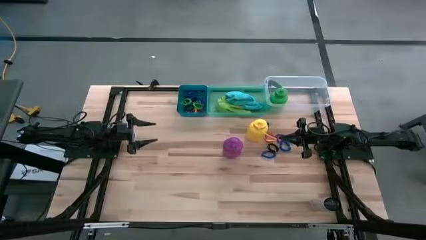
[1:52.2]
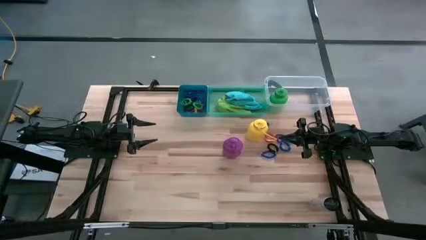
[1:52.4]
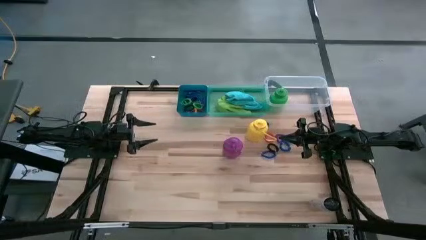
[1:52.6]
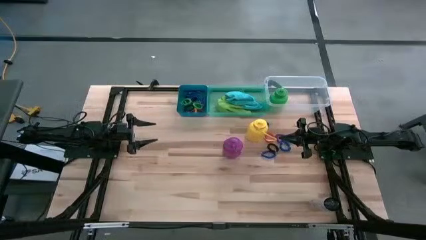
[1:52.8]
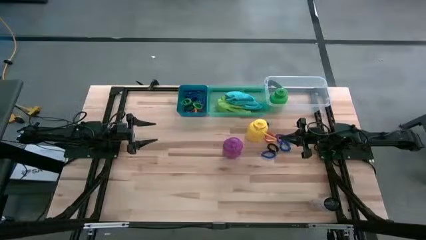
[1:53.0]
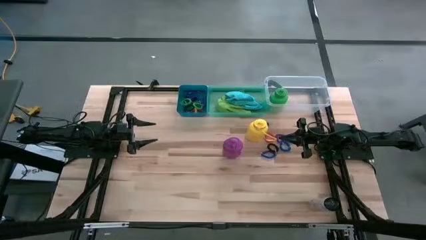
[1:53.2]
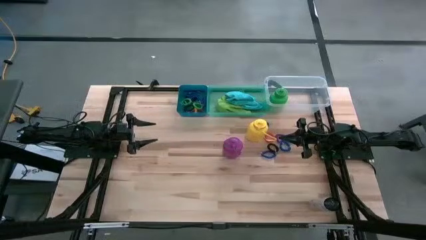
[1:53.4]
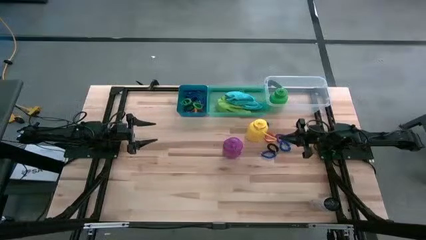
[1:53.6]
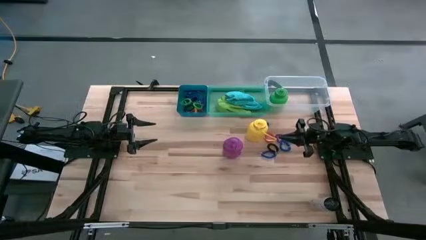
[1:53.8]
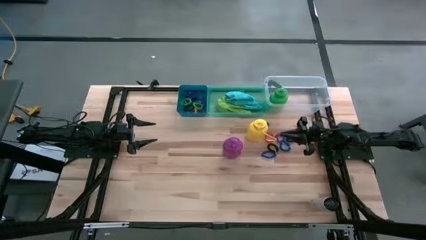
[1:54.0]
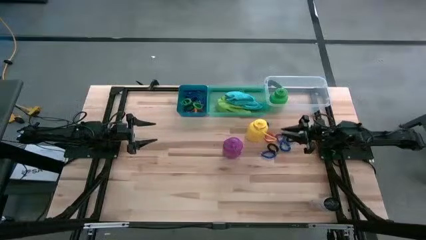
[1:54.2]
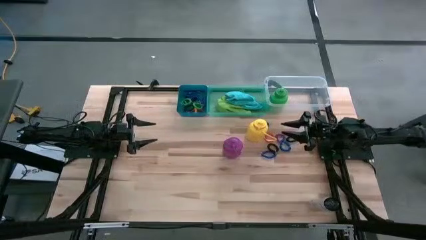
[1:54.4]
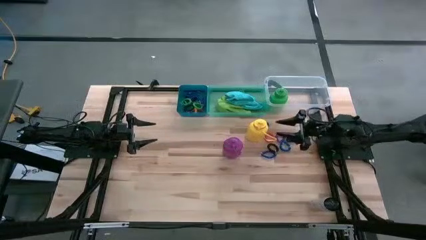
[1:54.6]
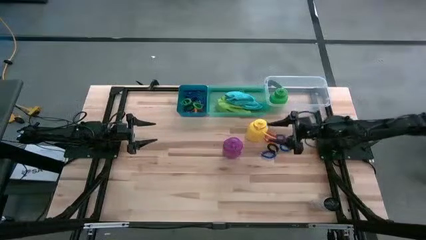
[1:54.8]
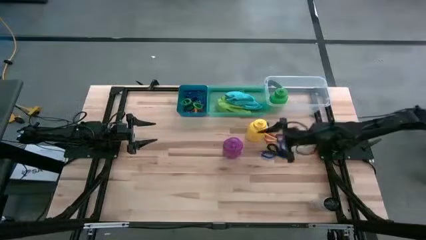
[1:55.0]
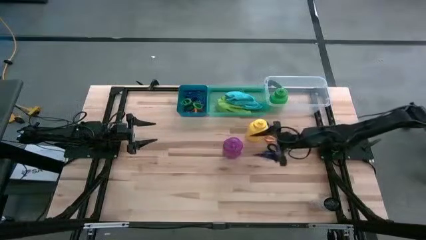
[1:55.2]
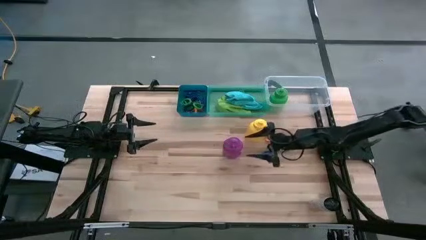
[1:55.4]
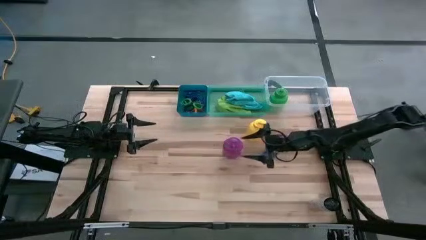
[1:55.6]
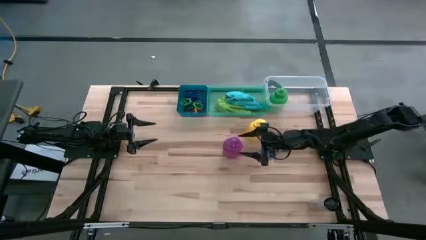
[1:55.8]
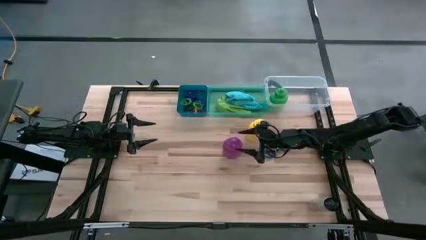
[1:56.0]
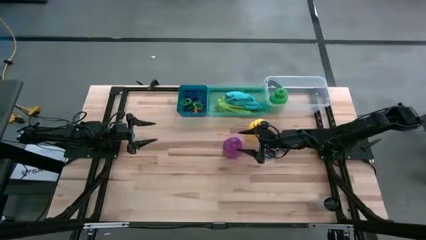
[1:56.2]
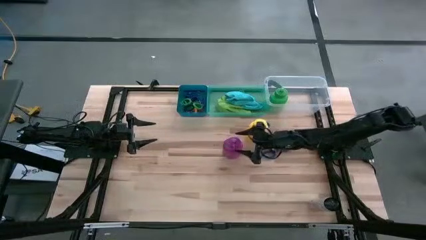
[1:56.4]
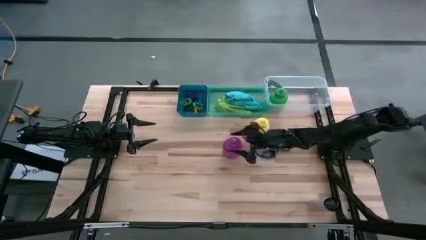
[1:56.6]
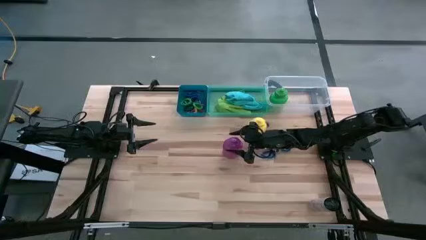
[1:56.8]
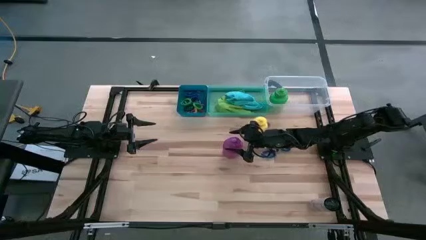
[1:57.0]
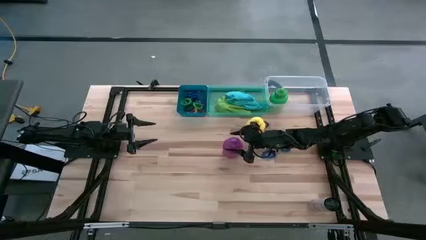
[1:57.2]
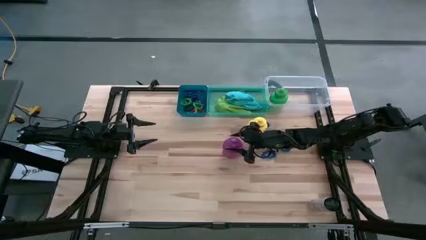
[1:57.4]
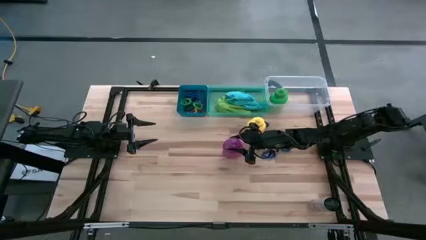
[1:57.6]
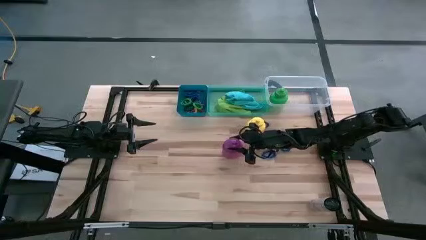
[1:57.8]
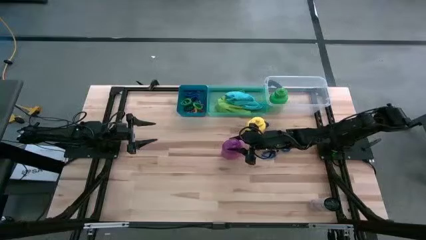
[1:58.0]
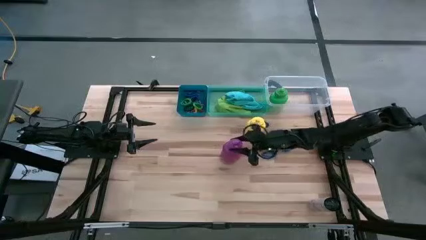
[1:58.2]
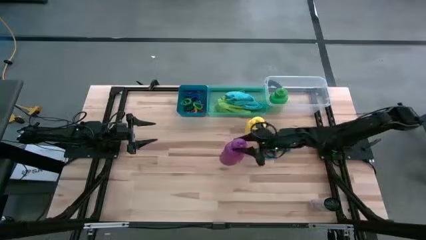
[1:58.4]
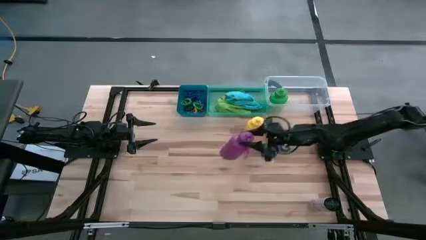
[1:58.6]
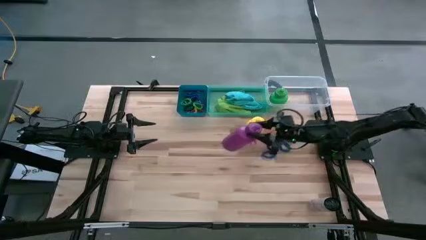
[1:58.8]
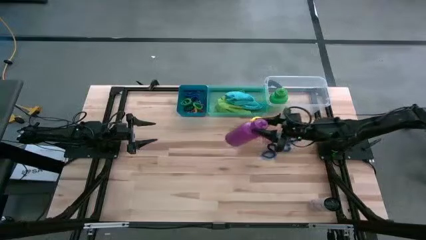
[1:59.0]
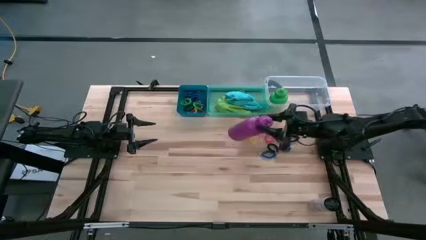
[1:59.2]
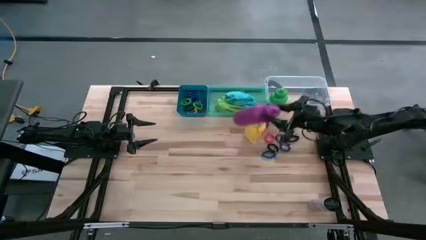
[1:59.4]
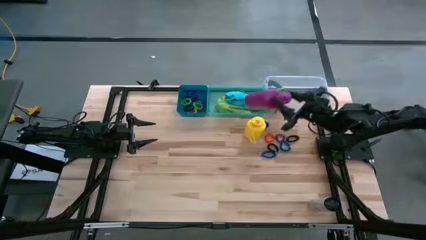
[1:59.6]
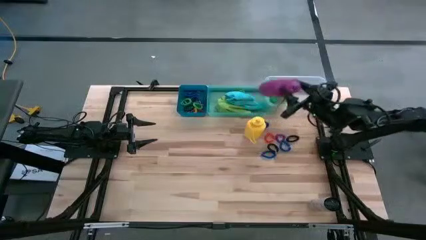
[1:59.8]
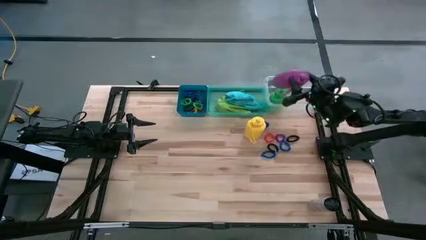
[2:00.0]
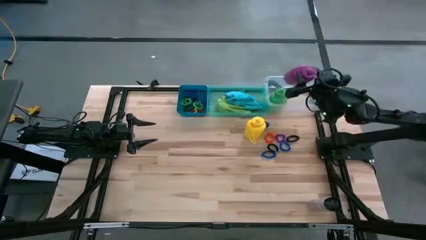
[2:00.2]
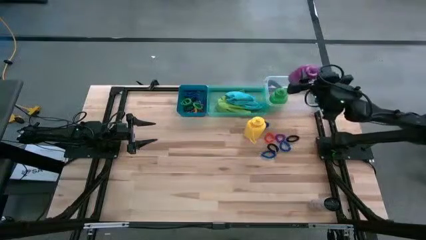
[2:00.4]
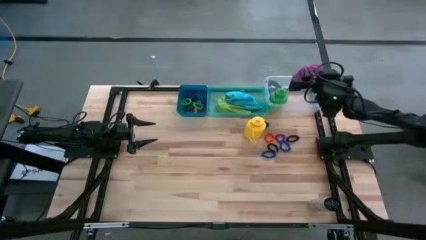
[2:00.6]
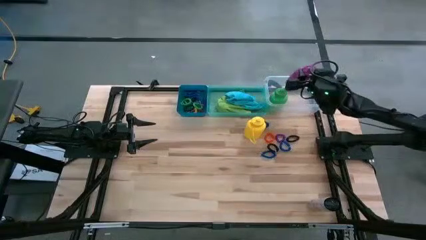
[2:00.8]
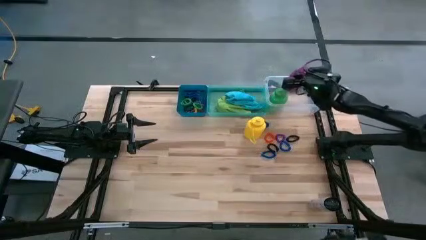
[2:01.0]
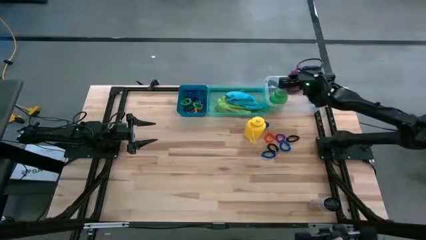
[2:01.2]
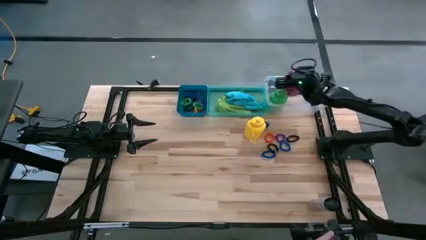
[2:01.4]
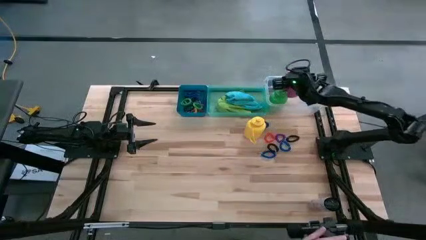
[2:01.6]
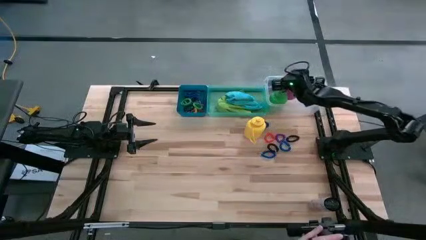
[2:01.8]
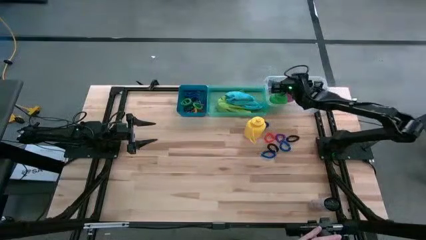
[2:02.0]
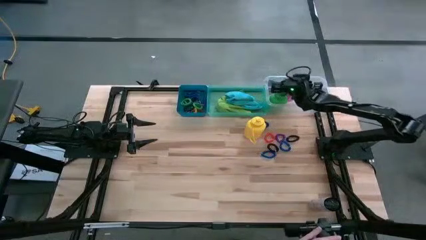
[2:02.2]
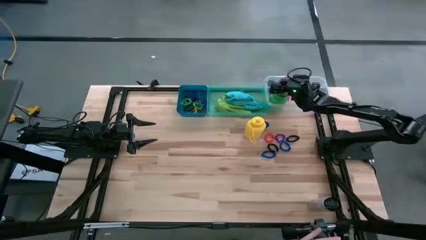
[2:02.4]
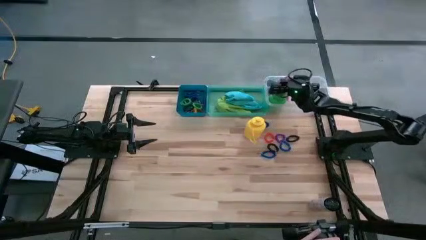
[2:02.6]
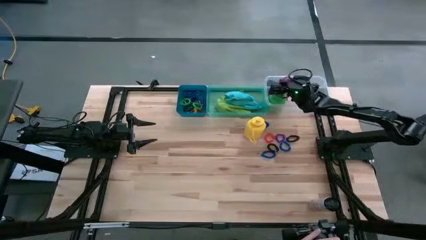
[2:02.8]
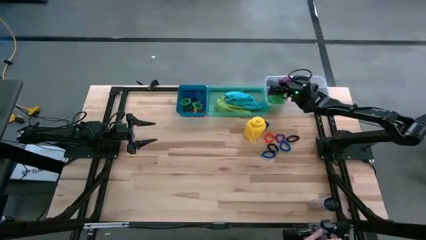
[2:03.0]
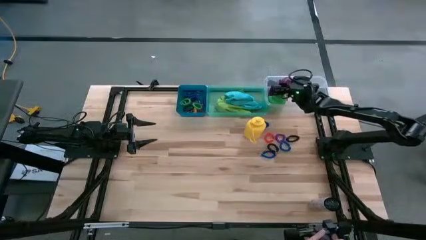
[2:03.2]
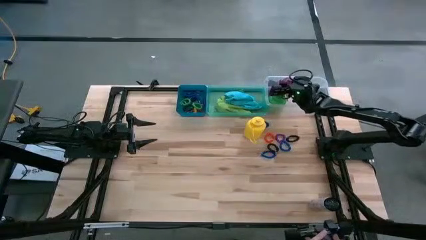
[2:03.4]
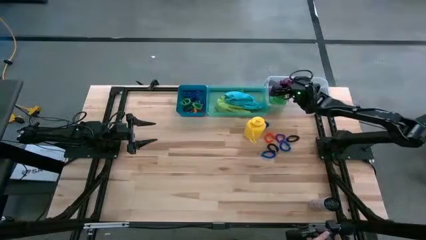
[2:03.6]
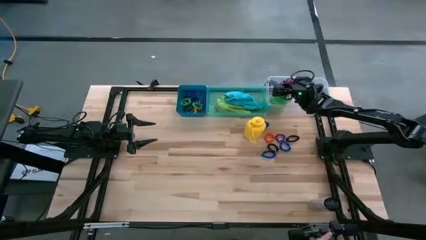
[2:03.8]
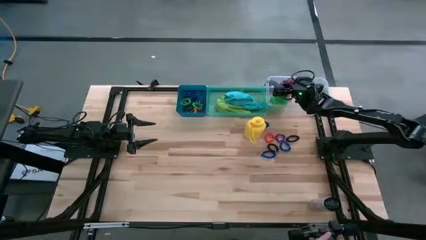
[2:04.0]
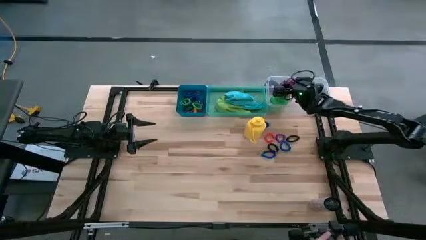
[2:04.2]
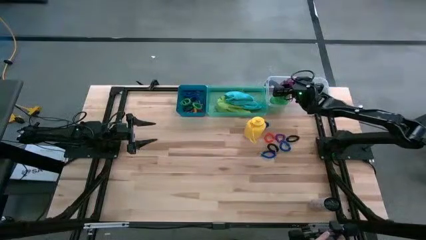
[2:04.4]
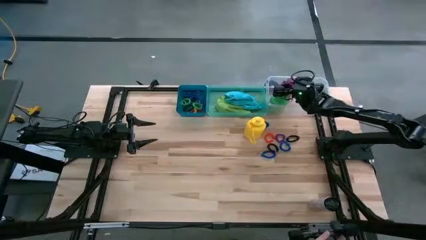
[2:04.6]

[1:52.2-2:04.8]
Task: Pick & Place Sports Items
Put the violet tumbler into the transparent bin

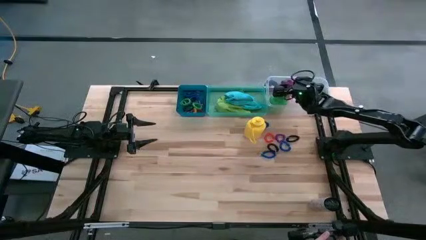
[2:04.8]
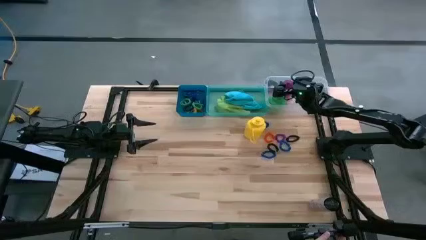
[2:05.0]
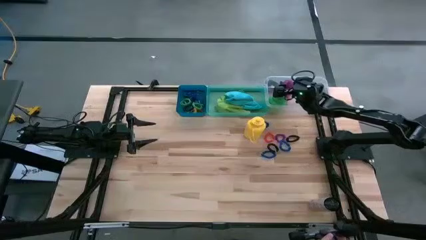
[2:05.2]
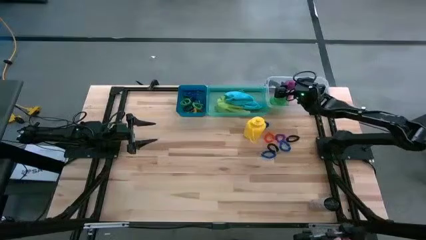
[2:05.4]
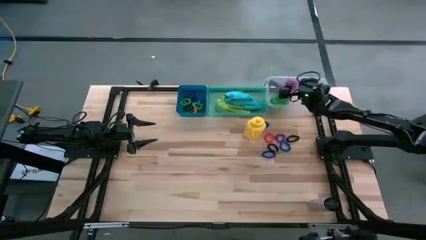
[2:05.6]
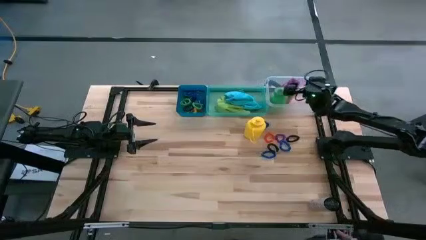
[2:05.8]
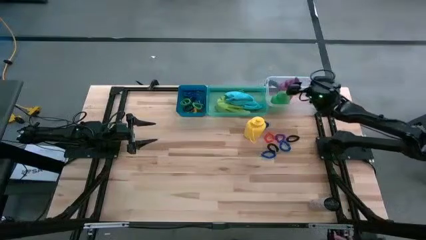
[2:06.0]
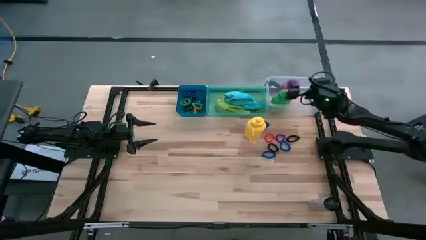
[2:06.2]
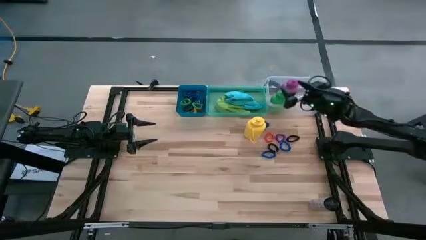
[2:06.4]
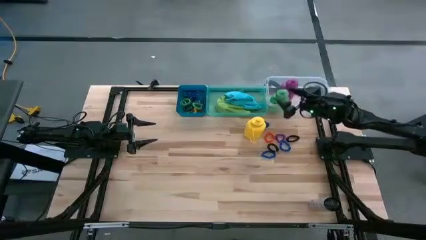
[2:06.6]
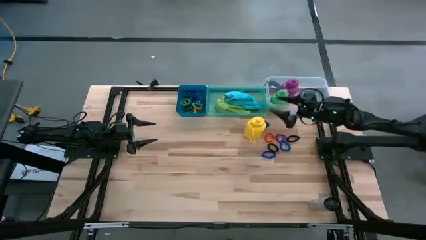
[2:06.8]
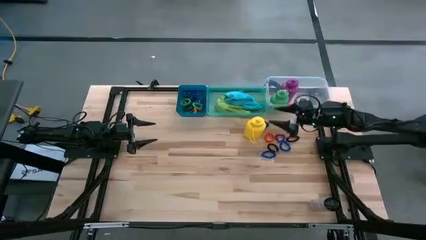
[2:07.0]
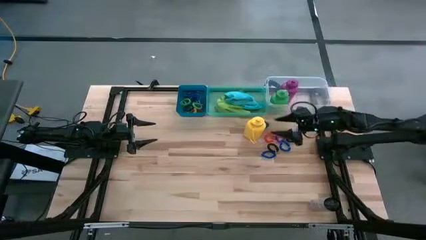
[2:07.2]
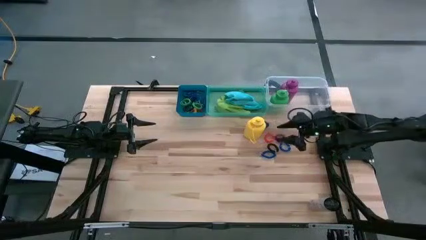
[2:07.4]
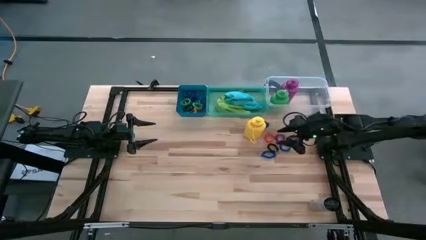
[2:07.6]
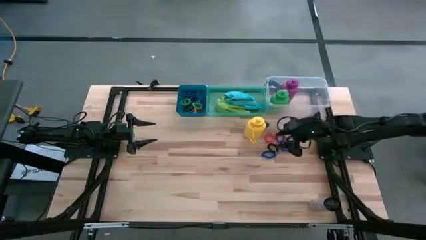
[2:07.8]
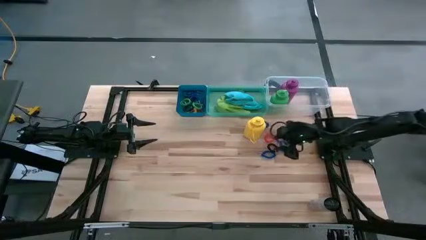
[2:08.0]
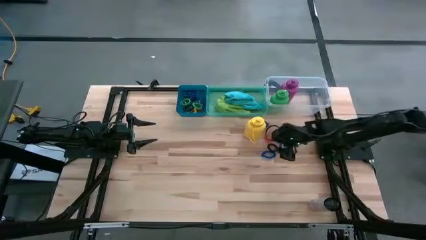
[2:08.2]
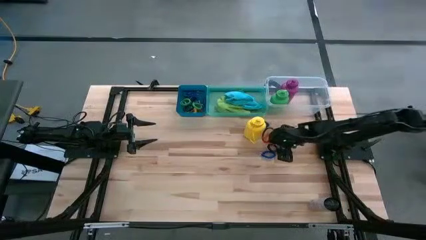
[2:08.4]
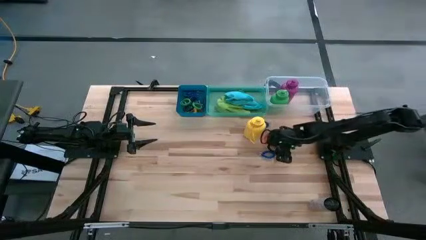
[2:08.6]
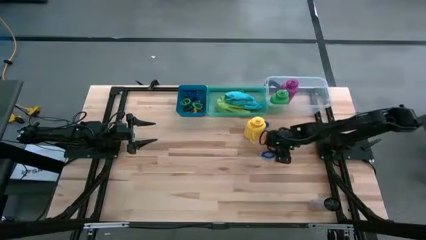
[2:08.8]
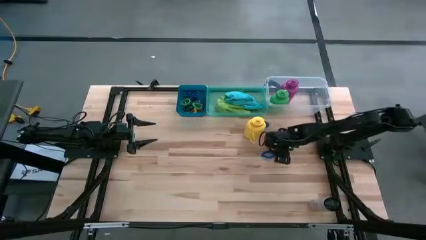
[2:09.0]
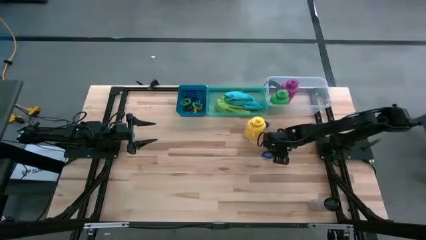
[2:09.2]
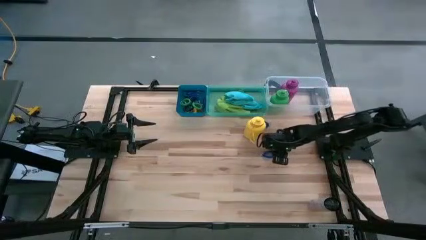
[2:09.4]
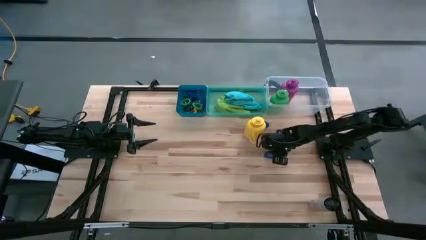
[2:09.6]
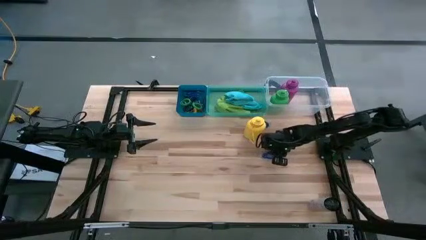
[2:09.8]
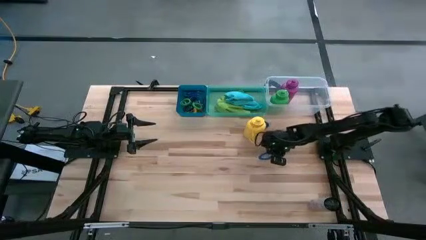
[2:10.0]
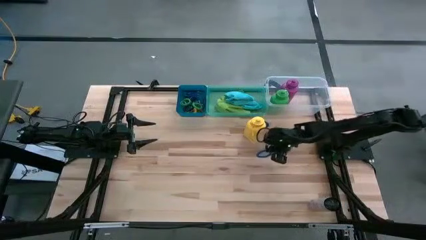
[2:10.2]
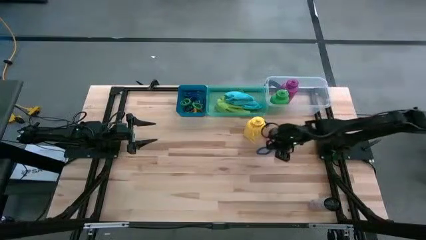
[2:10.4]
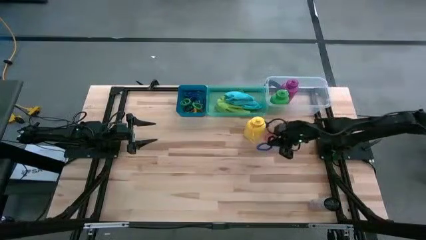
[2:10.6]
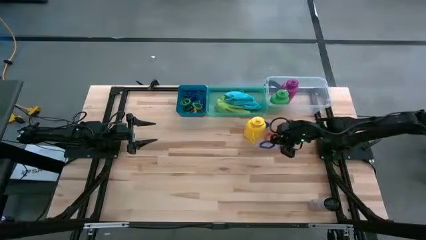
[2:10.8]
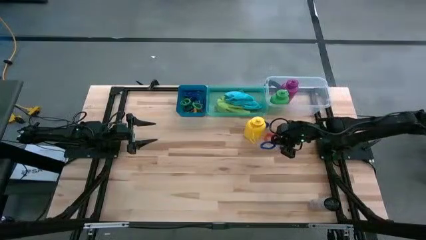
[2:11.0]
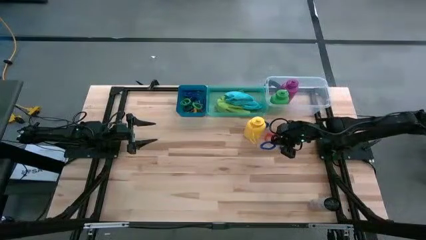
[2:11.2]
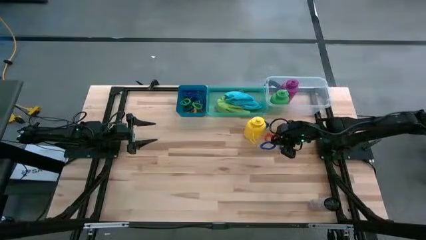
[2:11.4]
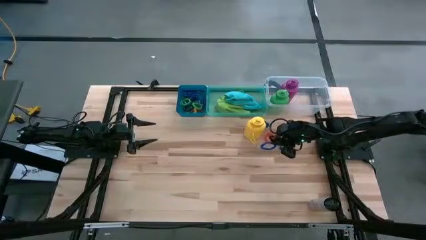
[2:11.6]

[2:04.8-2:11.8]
Put the bottom blue spring keychain into the blue bin
